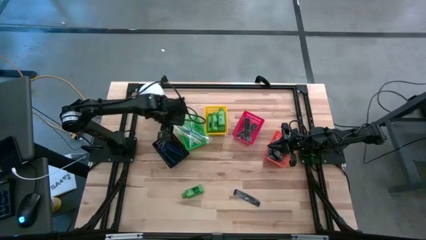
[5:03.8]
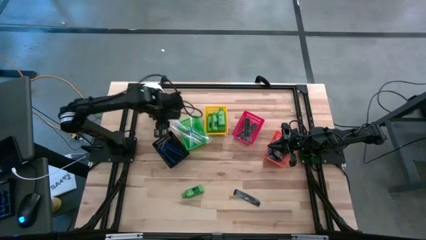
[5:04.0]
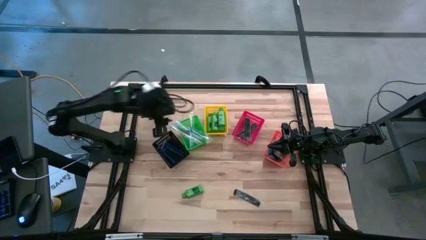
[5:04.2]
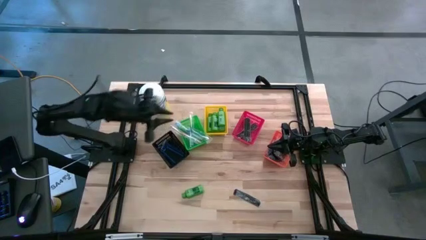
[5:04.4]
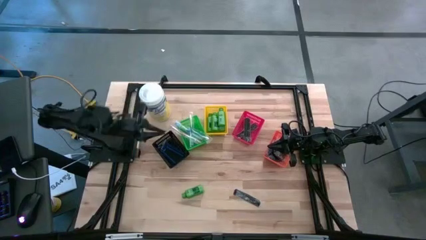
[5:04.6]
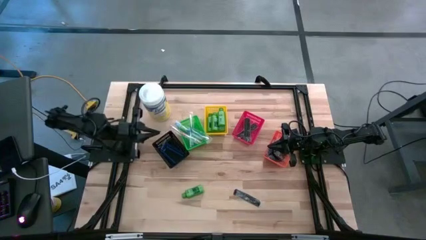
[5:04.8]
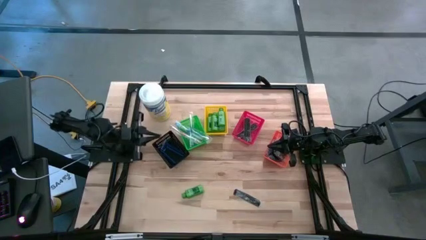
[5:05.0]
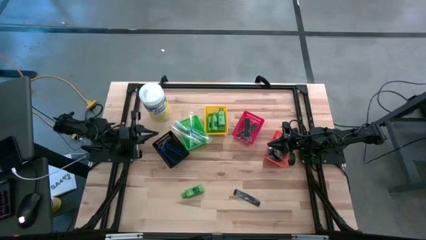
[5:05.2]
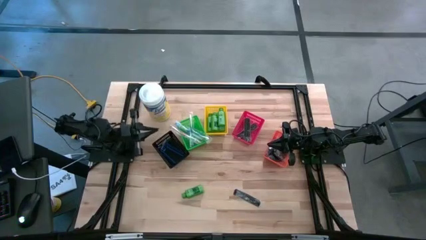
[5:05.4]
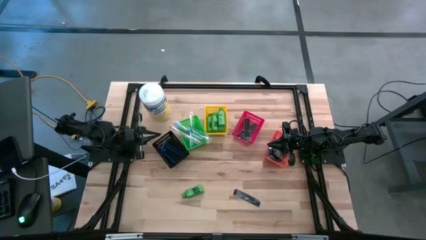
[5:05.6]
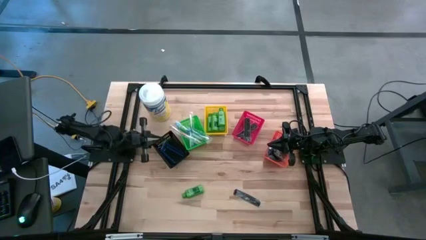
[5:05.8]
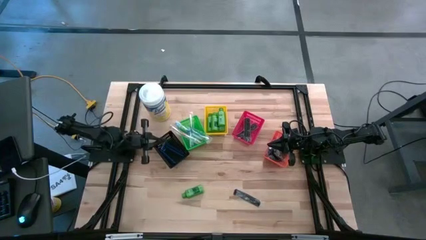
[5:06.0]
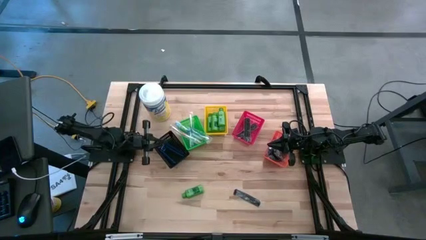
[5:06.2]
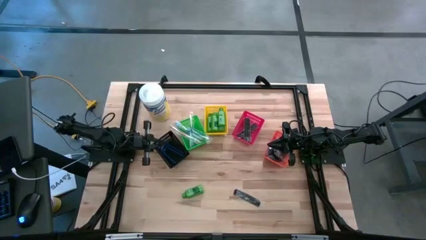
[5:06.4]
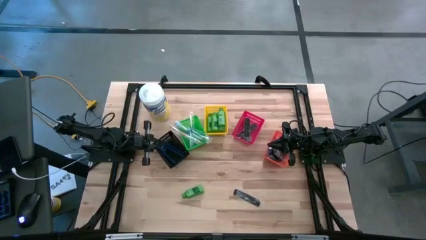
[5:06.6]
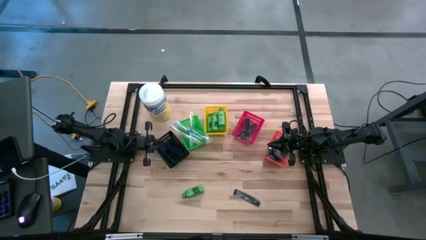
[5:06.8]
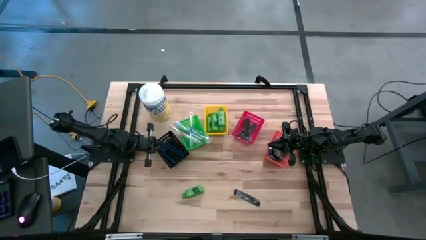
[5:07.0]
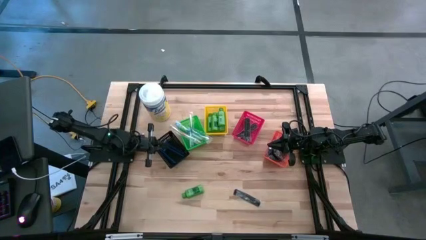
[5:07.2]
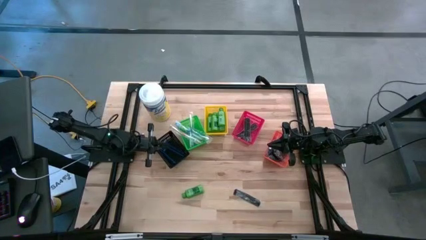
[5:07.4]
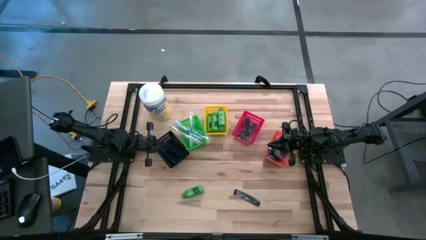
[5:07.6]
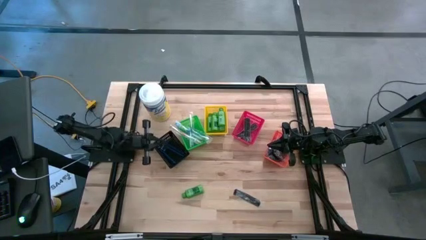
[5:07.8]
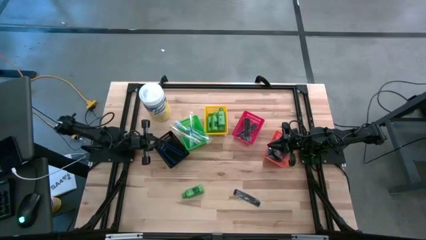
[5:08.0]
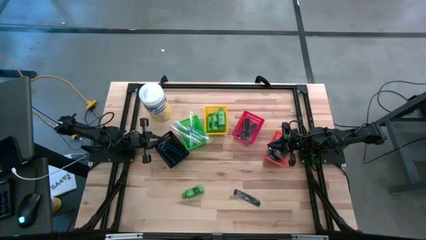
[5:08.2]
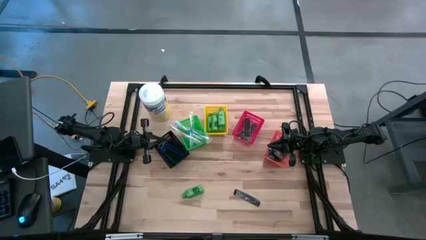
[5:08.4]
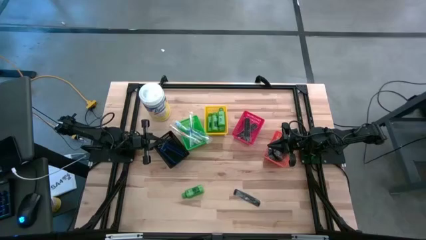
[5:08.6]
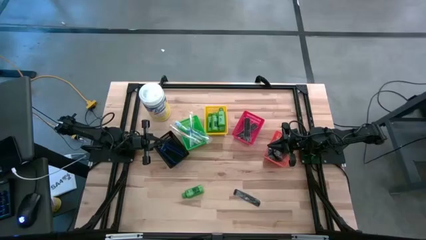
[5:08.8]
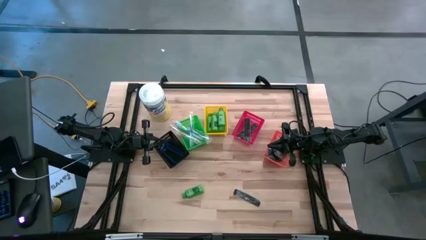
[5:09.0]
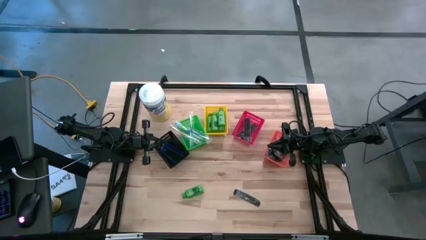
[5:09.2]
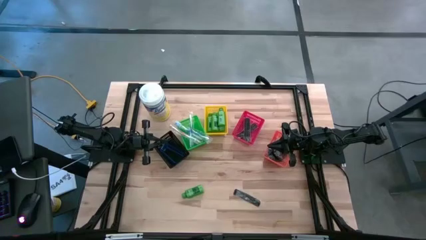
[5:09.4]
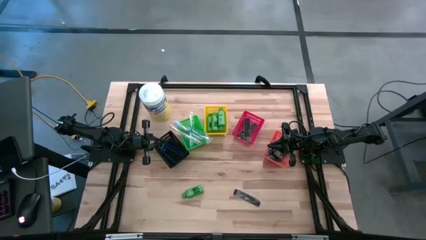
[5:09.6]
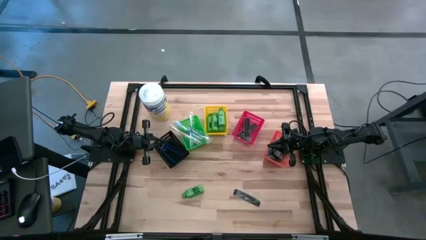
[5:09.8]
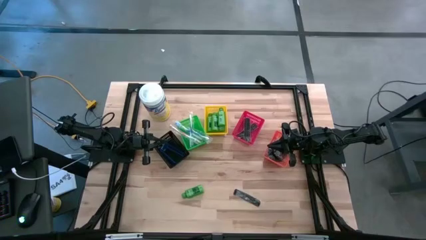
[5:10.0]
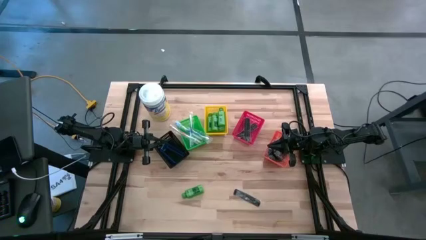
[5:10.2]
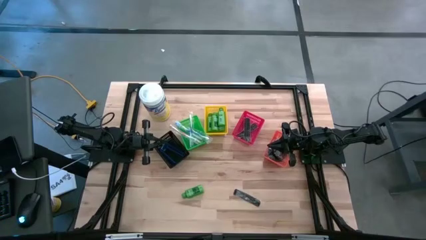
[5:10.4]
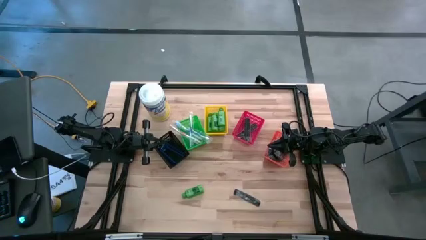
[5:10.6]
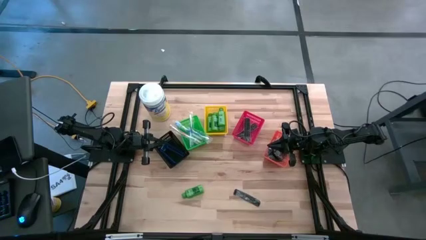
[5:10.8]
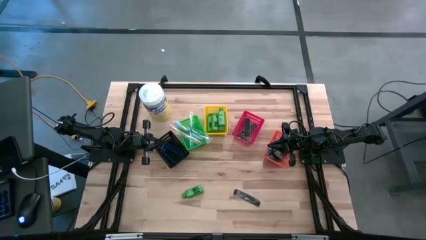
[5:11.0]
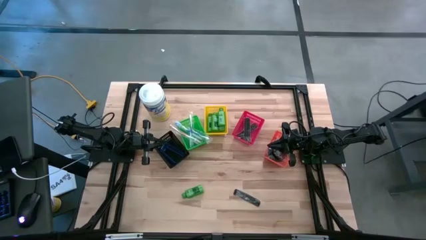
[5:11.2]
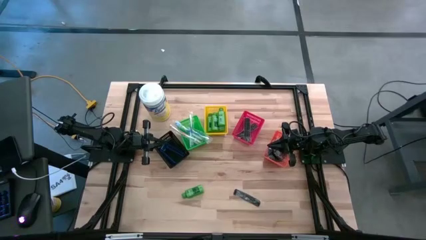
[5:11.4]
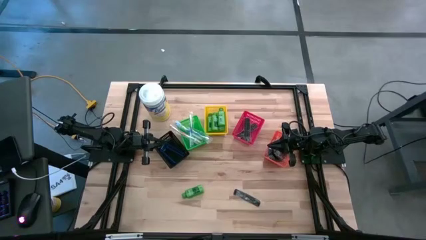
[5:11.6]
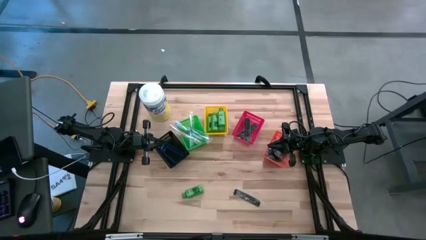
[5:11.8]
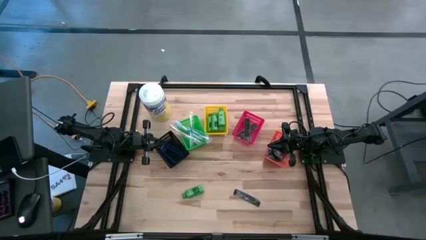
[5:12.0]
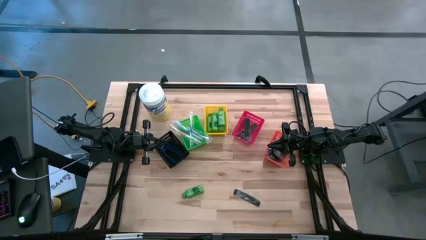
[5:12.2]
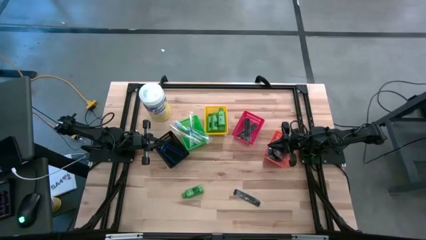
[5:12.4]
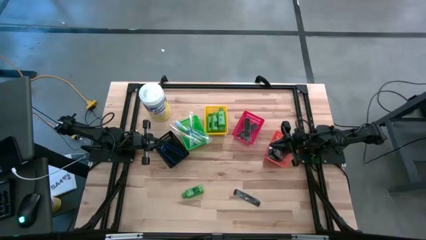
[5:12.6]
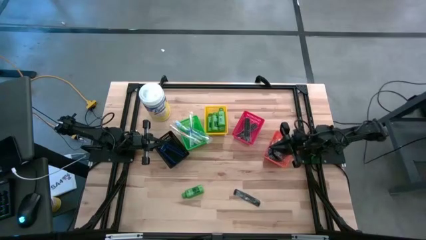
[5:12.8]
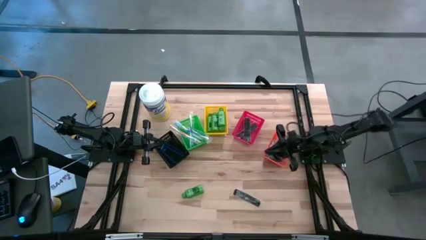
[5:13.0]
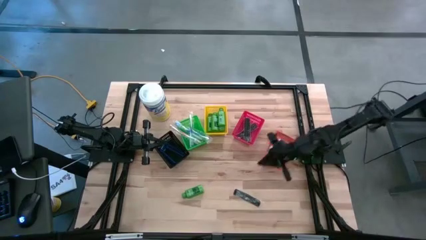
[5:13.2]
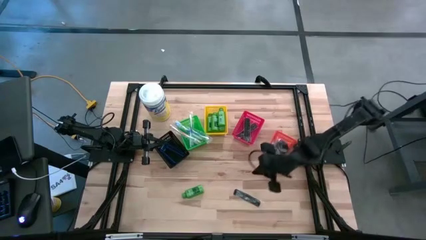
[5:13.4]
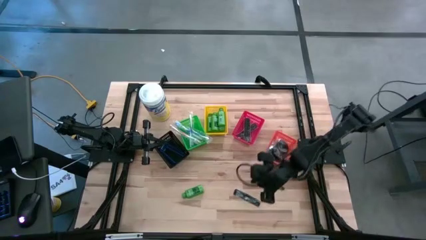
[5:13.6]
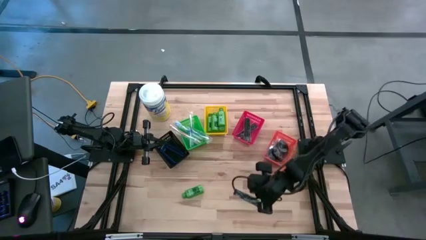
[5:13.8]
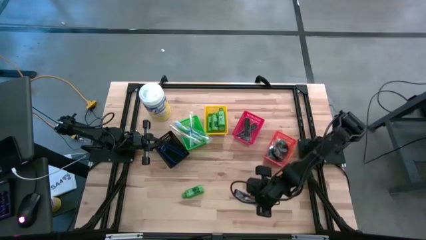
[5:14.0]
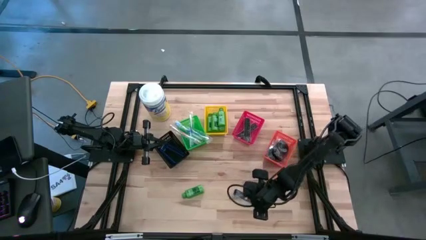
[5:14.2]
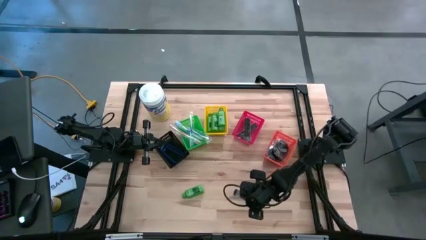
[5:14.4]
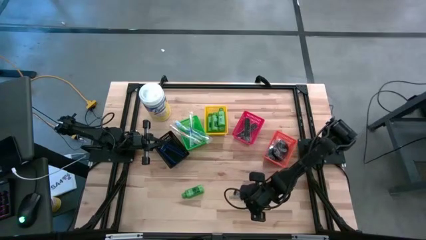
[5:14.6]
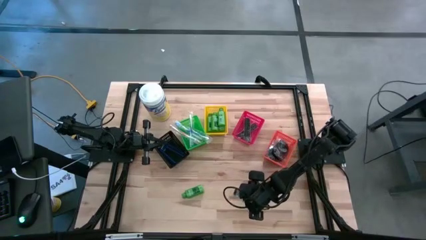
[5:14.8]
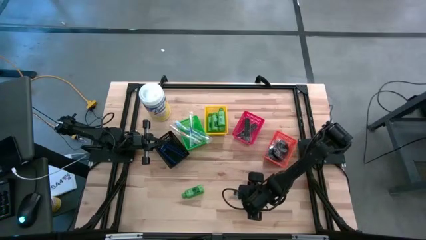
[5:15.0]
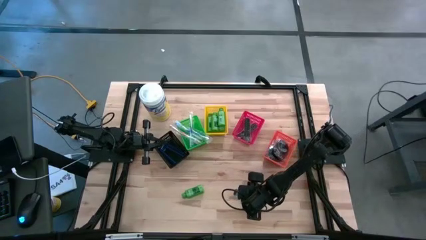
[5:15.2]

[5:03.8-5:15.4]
Task: Pick & Place Travel size toiletries
Put the black hair comb into the red bin
